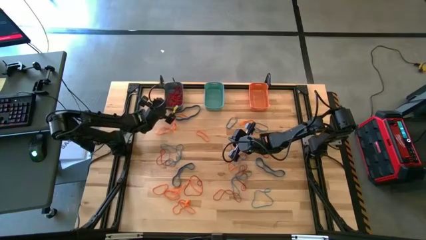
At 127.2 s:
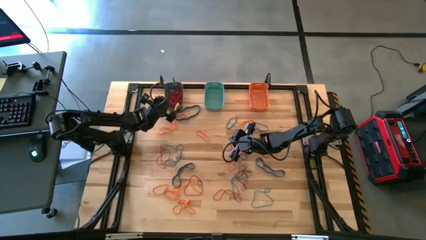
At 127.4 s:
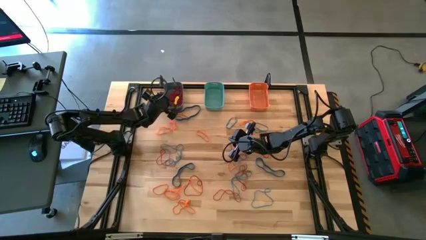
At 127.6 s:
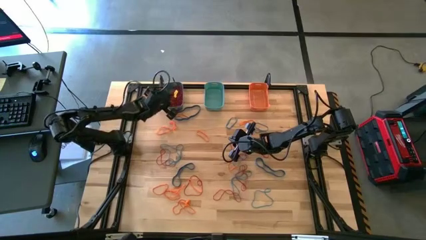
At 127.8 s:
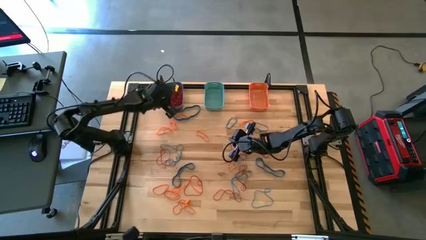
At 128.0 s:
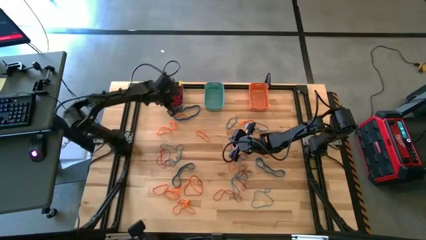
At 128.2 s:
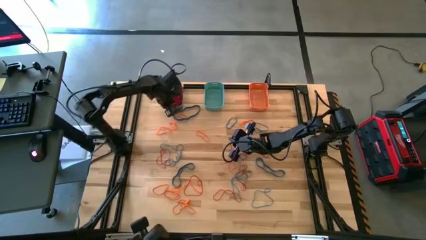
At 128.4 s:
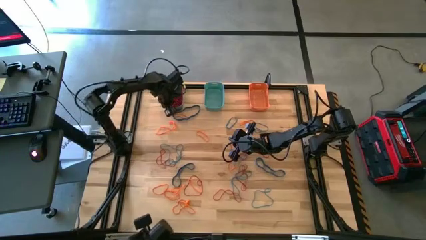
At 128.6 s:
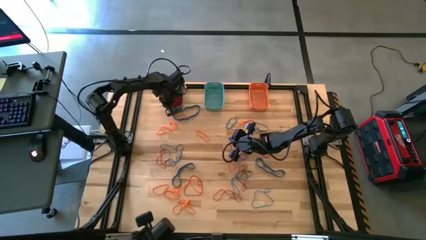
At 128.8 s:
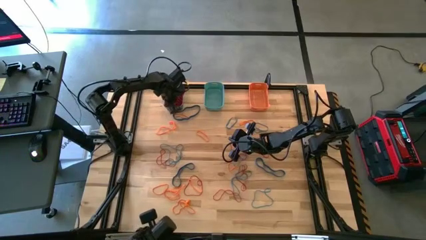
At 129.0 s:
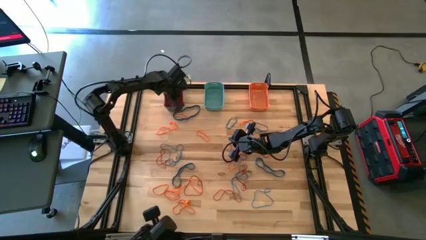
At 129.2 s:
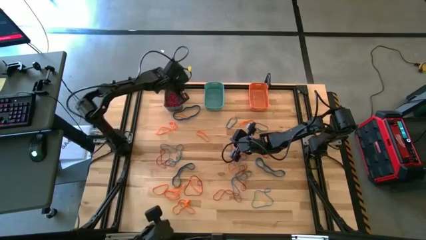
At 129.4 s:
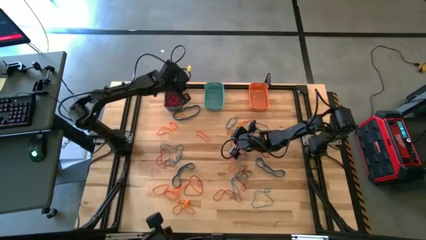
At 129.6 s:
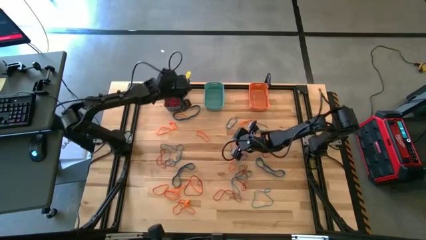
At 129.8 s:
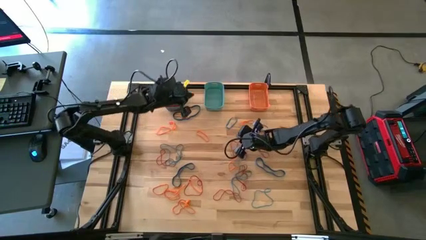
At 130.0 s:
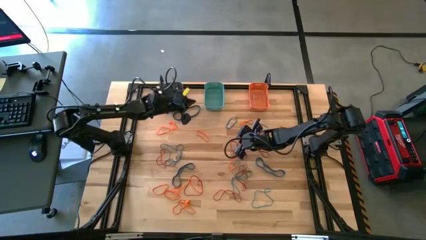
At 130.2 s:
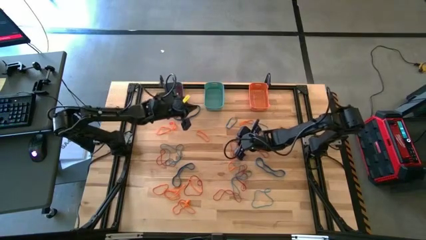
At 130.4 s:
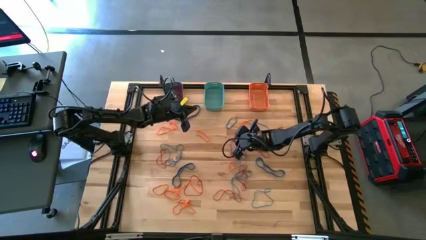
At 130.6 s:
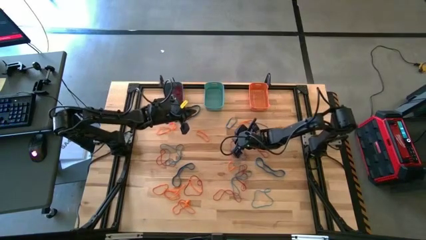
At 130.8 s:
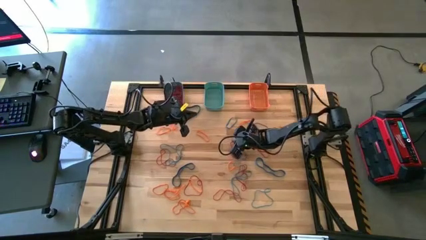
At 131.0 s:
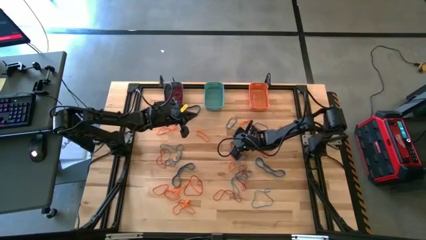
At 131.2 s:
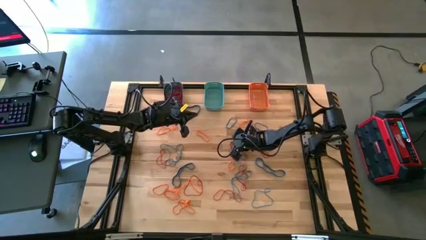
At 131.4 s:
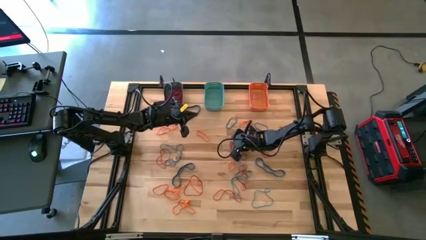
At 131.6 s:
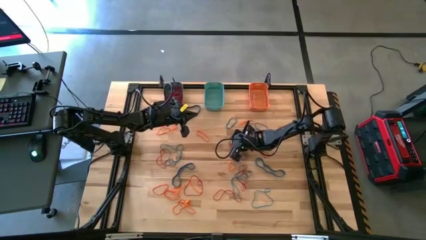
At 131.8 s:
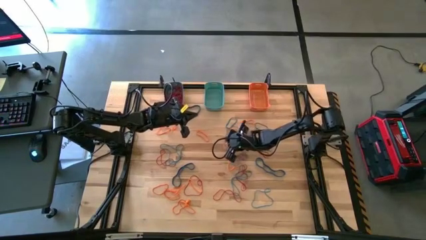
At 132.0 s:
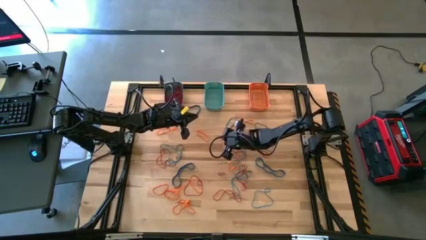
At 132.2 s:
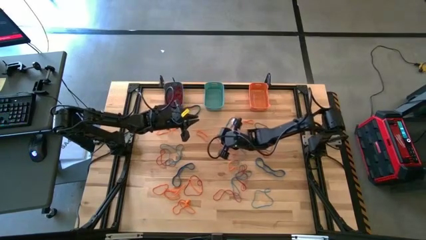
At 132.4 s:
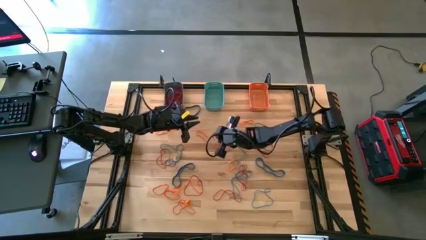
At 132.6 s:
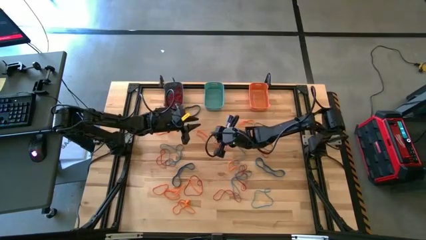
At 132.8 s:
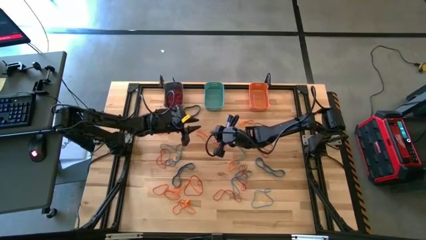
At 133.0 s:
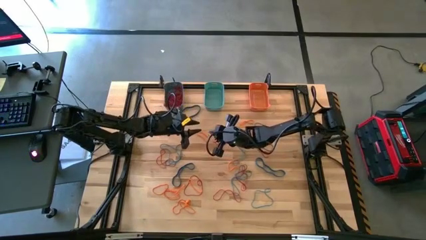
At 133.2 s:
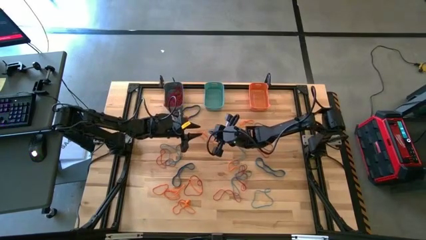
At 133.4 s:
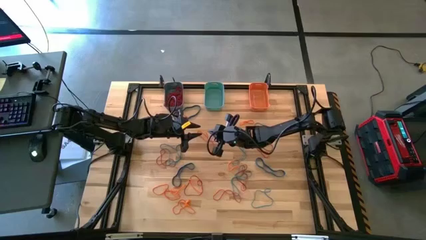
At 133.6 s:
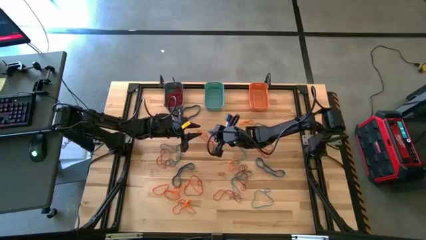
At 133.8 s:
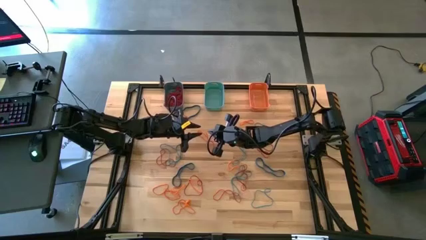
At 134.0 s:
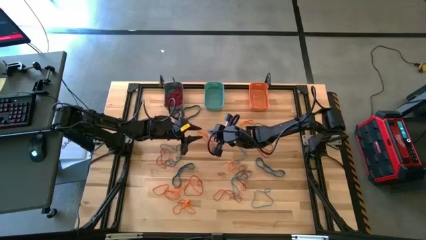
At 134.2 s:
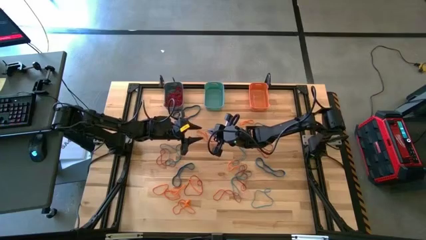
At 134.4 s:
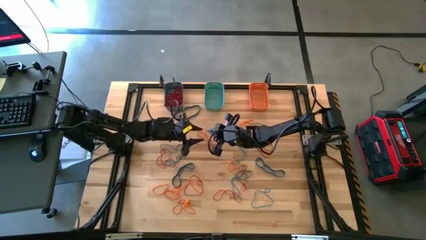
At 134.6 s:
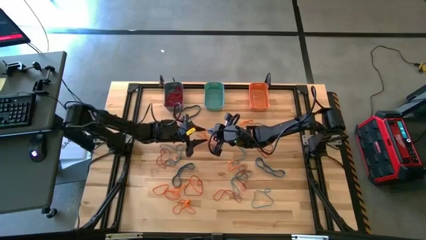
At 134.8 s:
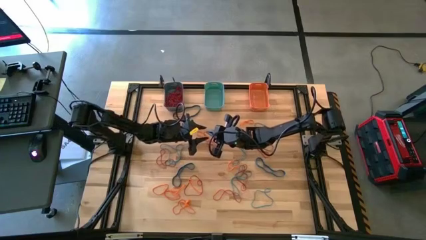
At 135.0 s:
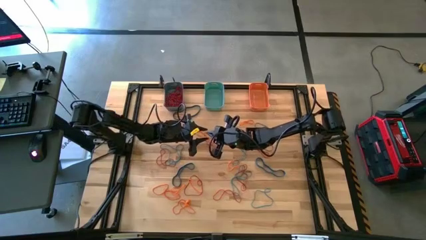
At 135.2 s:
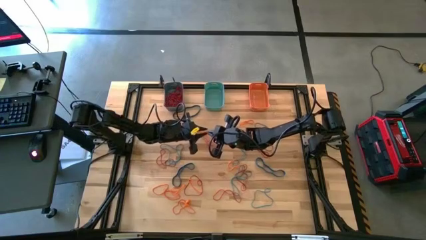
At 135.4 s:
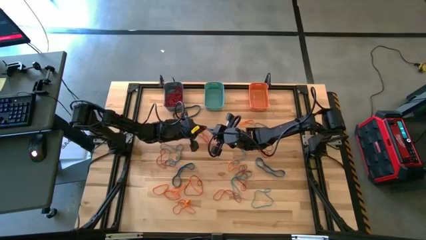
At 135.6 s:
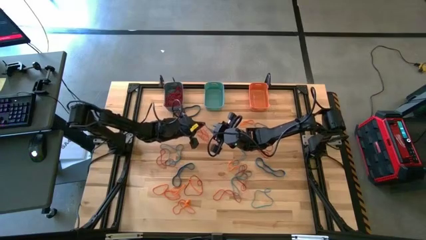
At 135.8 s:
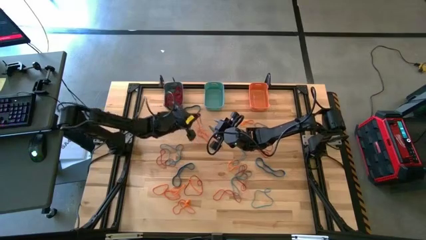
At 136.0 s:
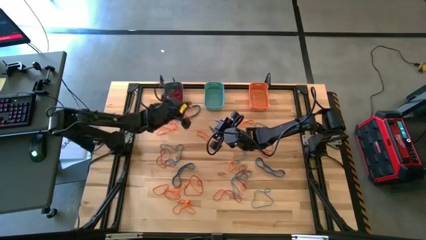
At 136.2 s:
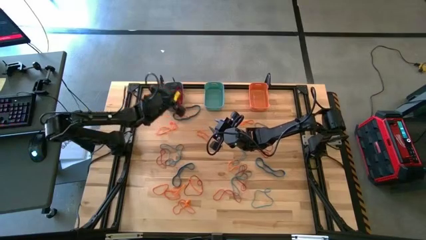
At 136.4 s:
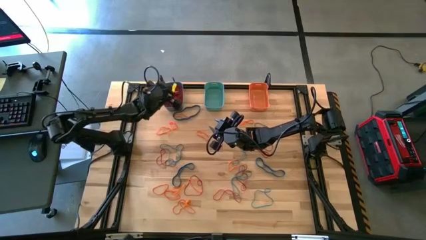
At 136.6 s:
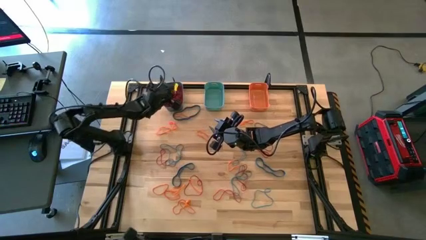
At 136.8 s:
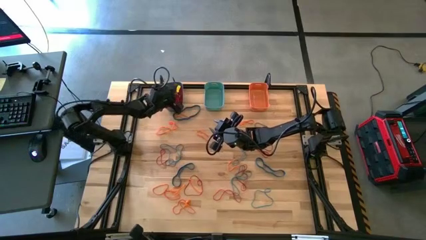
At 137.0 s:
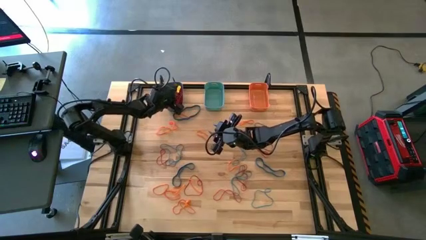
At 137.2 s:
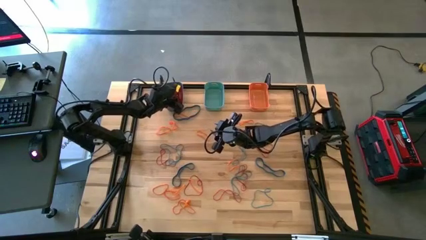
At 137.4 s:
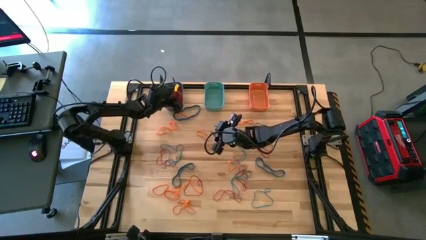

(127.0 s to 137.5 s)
Task: Sort rubber bands into baskets
Put the red rubber band into the blue bin

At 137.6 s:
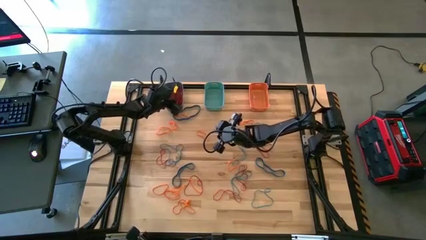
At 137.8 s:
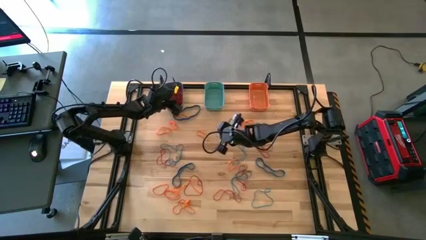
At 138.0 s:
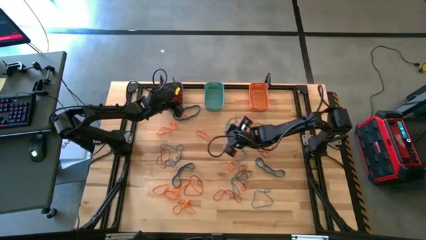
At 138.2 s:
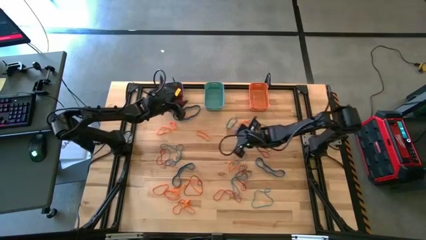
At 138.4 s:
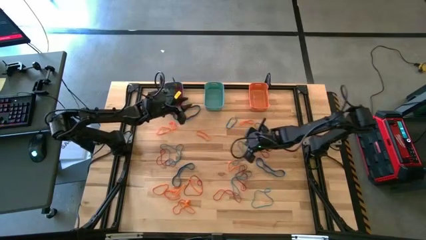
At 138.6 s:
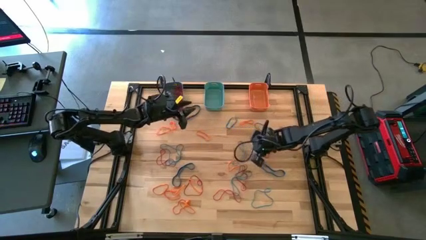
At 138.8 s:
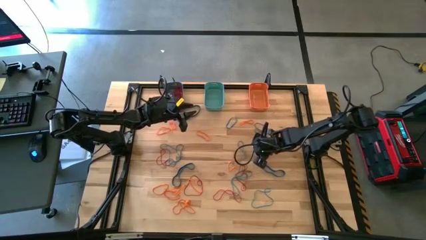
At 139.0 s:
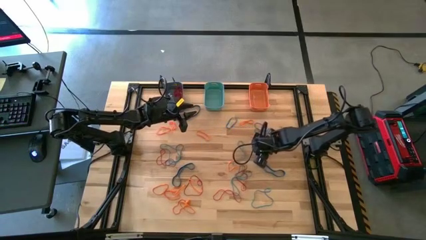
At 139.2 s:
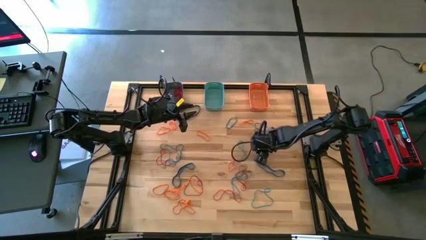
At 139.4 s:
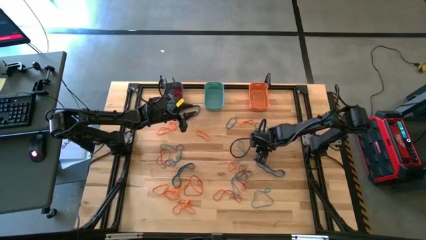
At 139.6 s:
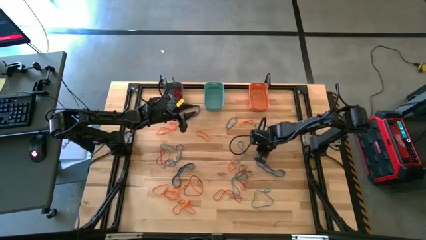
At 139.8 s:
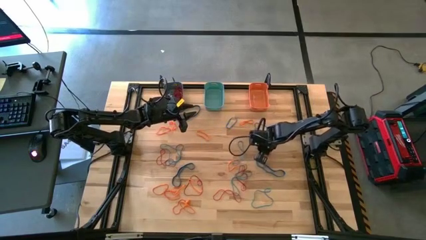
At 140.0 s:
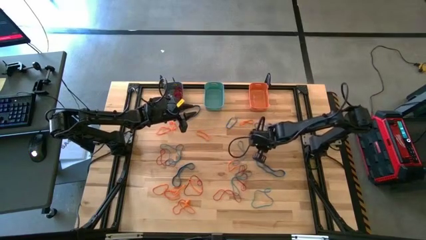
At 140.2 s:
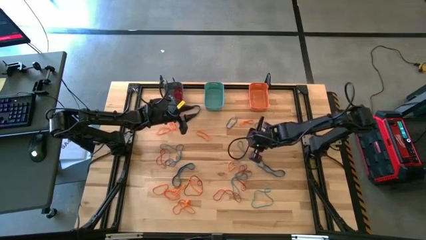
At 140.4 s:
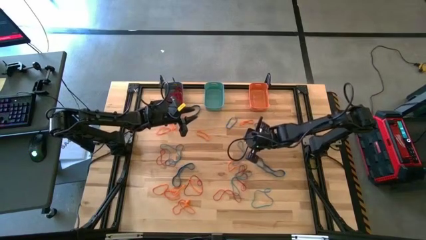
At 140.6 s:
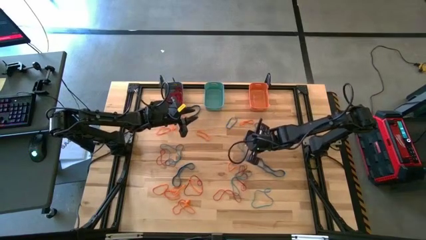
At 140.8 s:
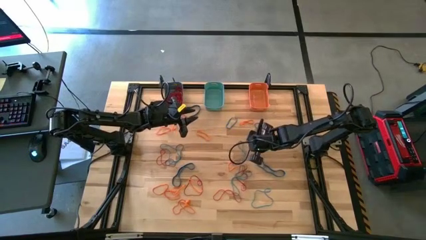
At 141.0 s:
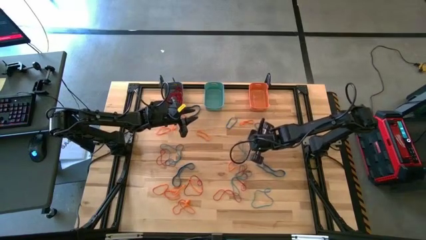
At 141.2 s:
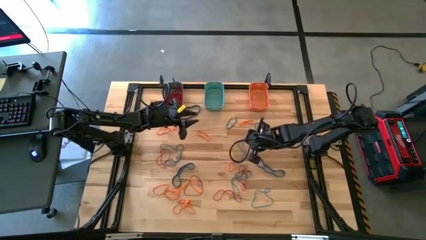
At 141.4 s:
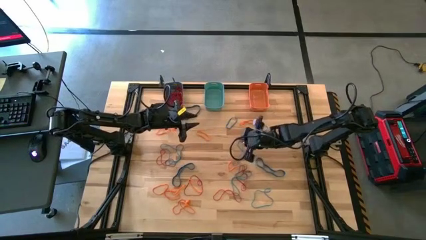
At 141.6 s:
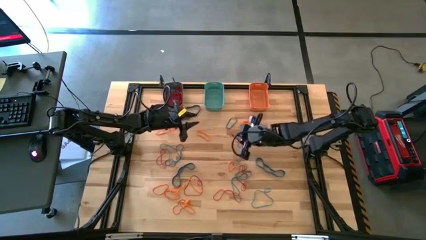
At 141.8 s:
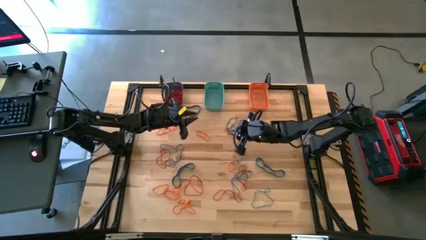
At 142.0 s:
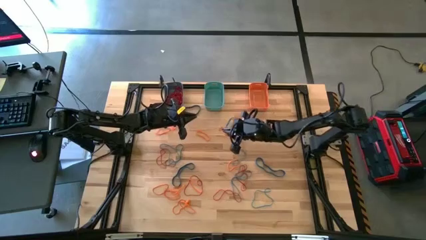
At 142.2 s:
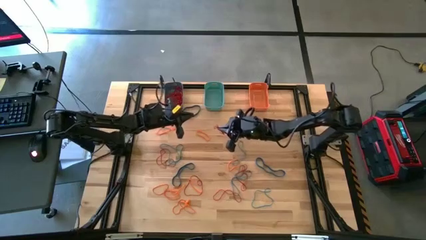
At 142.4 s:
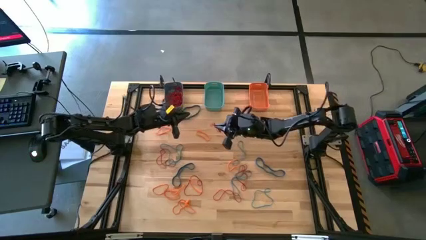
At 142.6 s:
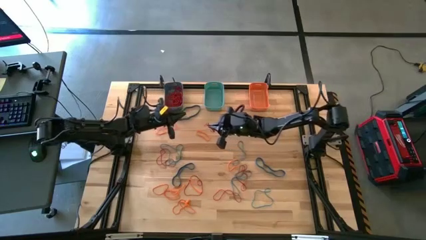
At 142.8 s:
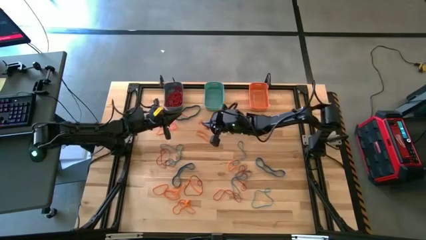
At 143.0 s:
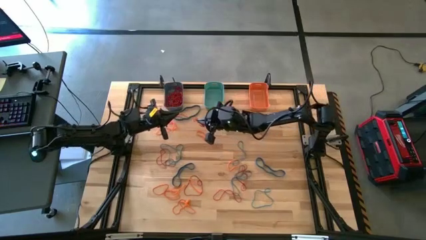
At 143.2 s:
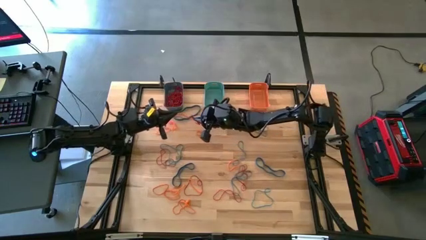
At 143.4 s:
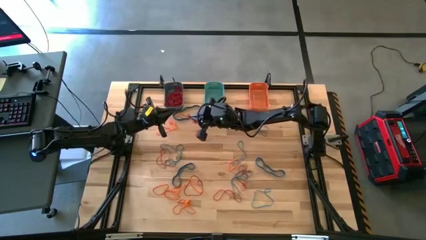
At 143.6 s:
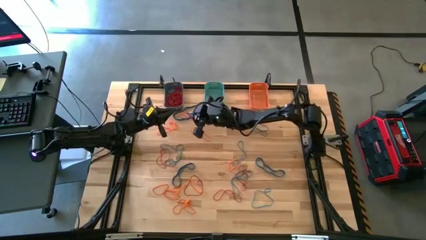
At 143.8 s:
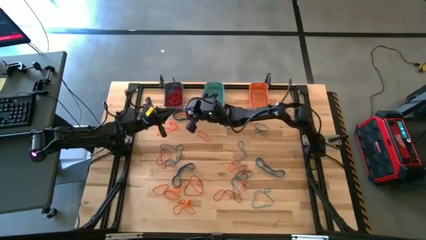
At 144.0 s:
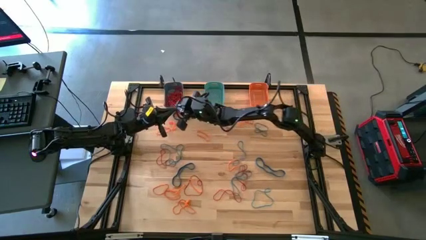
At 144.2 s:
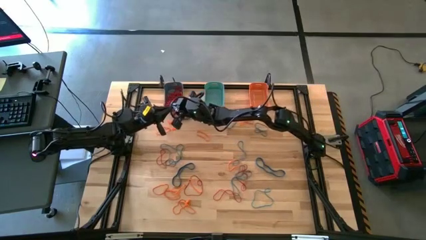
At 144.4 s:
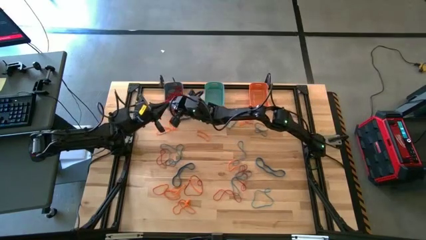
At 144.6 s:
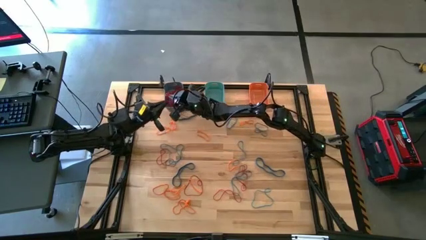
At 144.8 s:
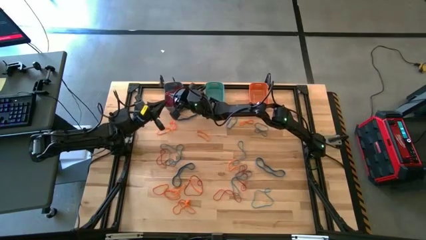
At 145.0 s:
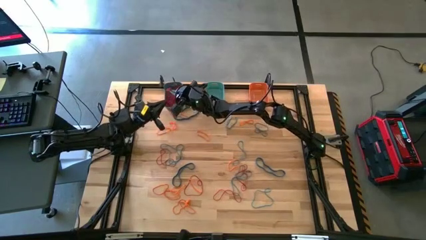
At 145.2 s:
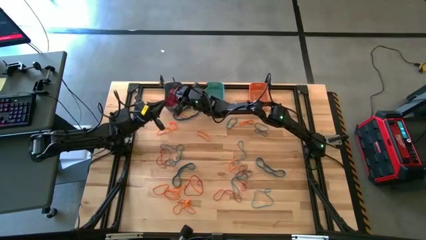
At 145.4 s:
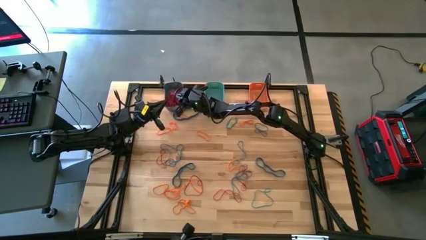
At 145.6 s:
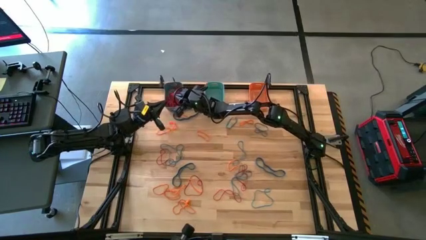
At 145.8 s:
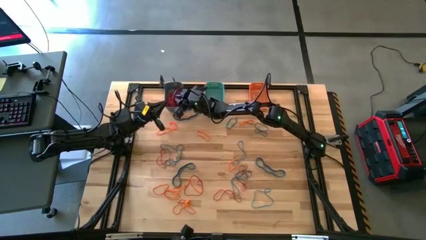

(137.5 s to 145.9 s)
Put the red rubber band into the blue bin
